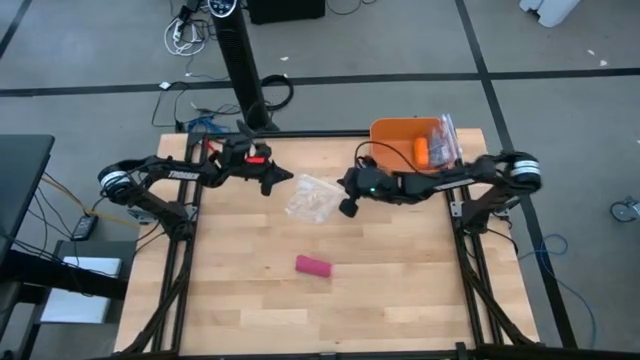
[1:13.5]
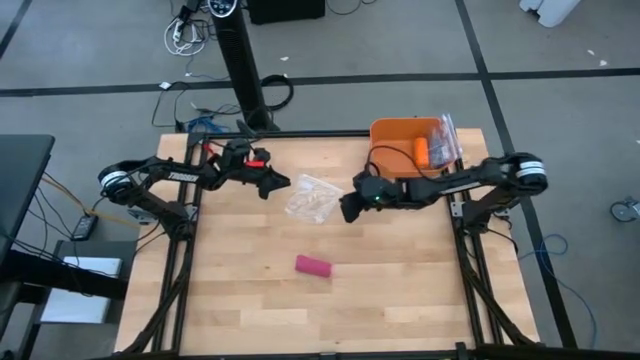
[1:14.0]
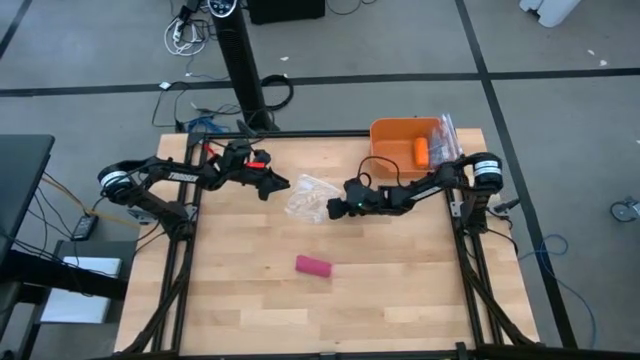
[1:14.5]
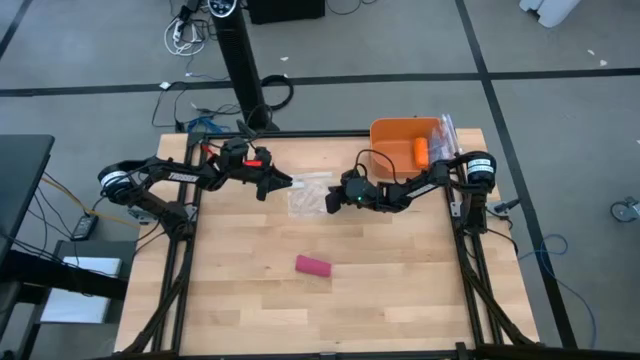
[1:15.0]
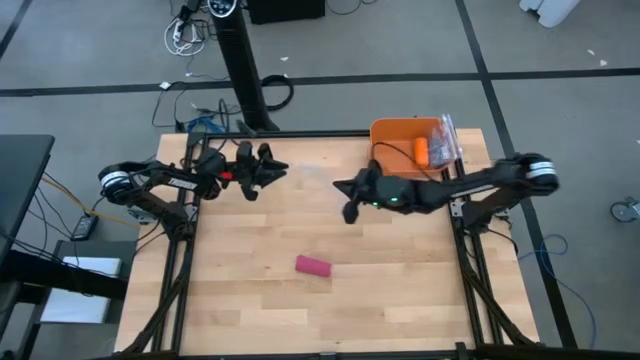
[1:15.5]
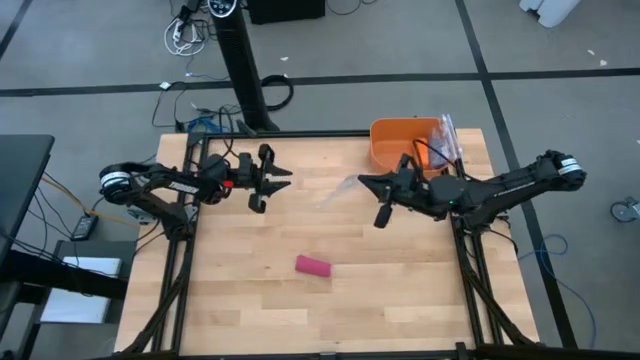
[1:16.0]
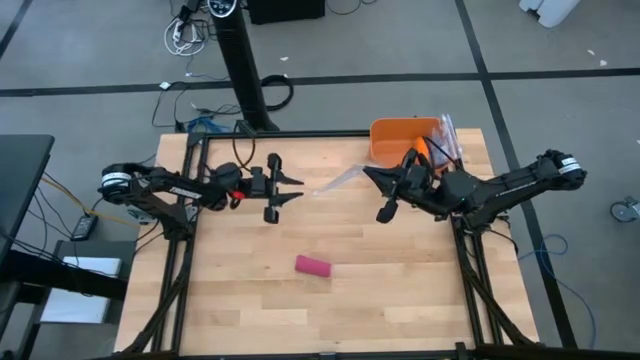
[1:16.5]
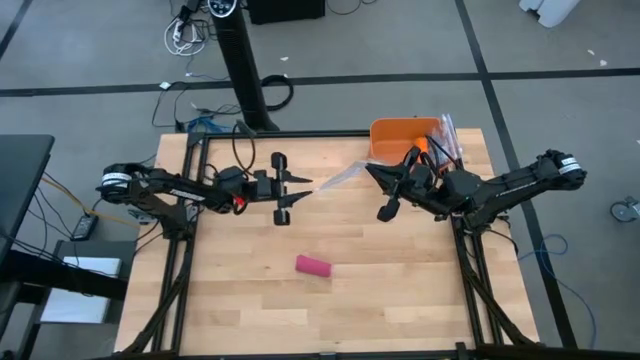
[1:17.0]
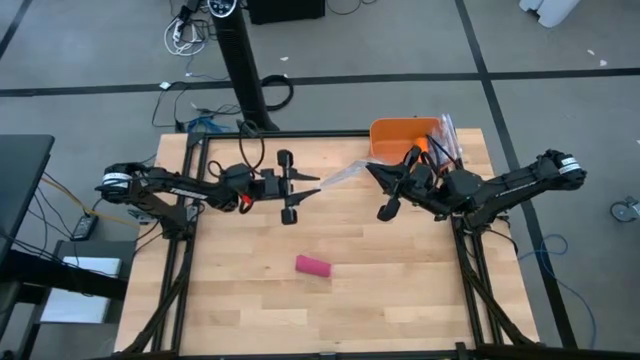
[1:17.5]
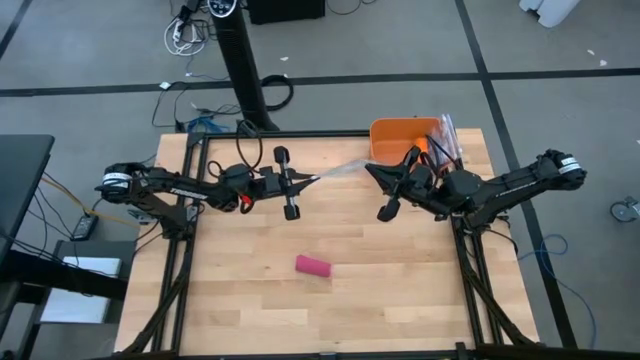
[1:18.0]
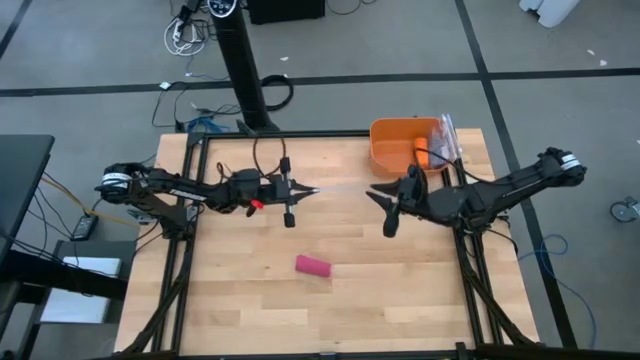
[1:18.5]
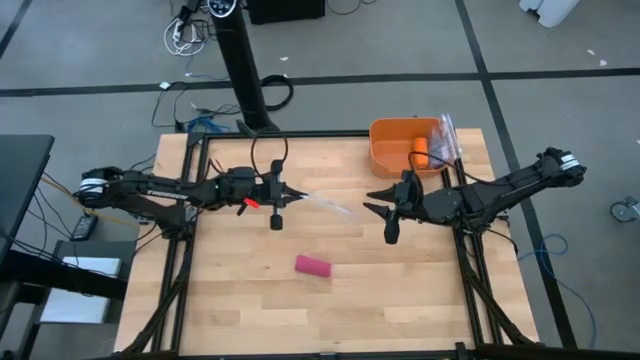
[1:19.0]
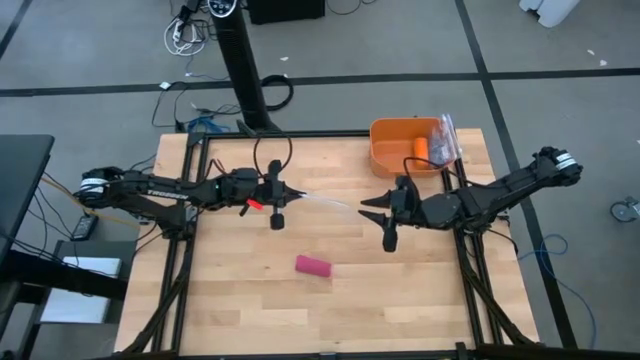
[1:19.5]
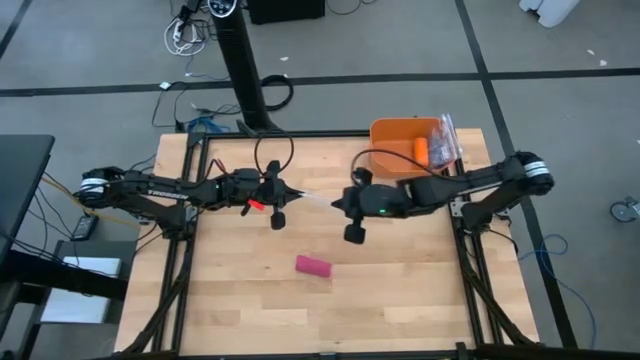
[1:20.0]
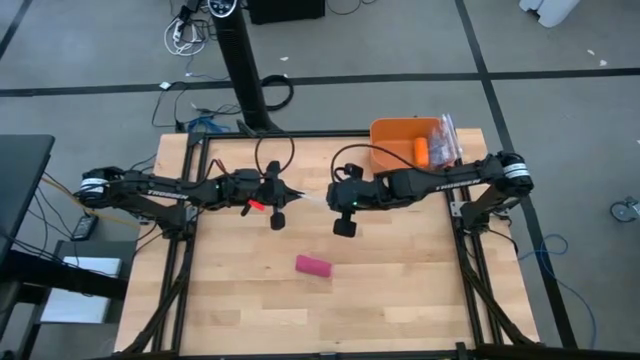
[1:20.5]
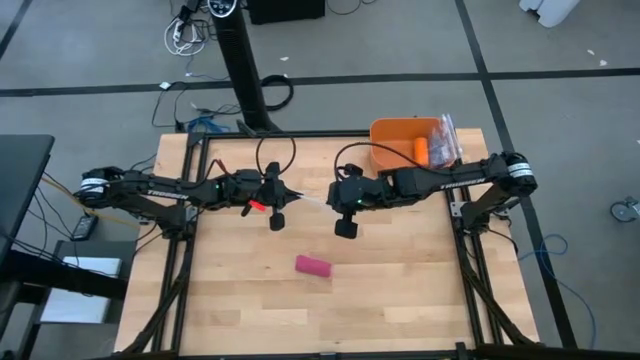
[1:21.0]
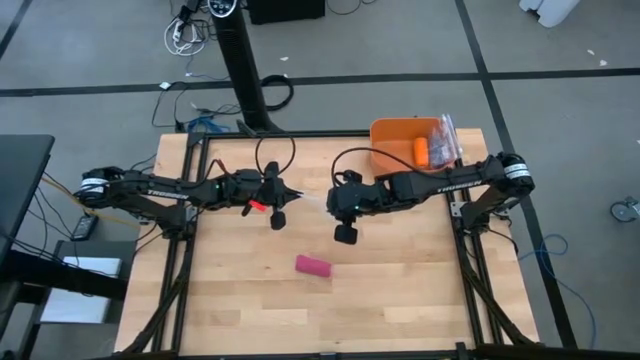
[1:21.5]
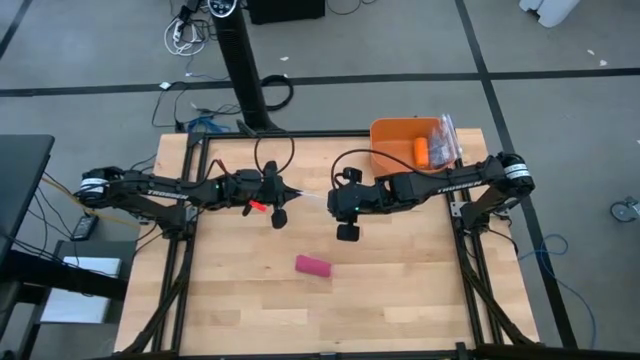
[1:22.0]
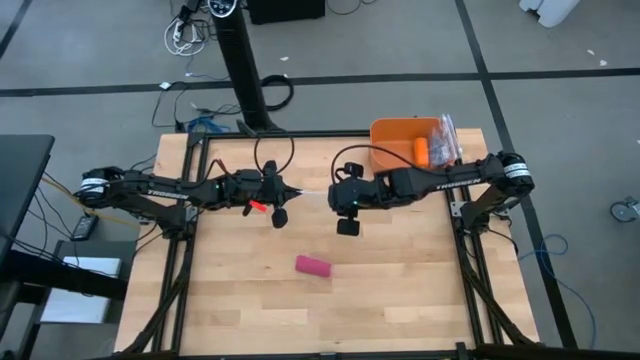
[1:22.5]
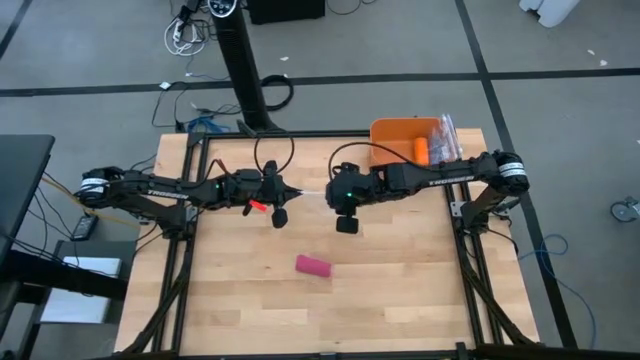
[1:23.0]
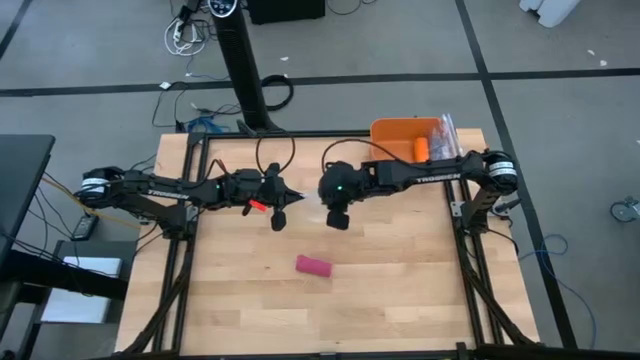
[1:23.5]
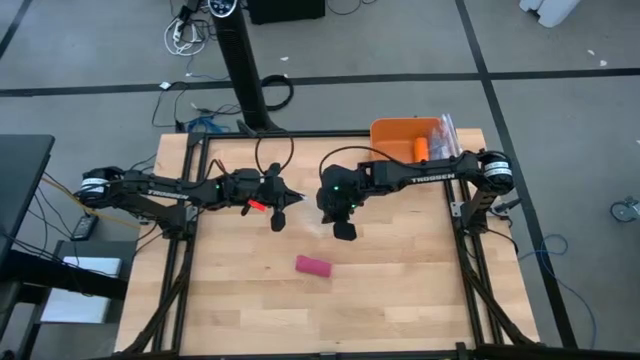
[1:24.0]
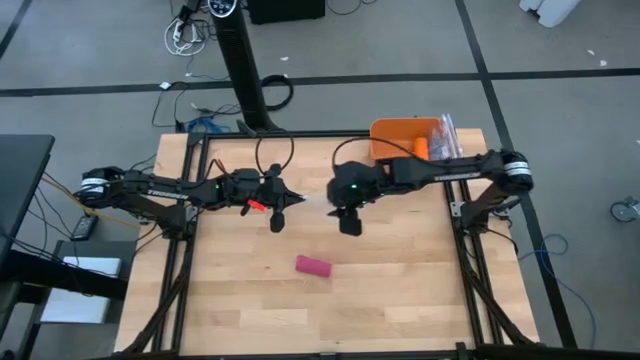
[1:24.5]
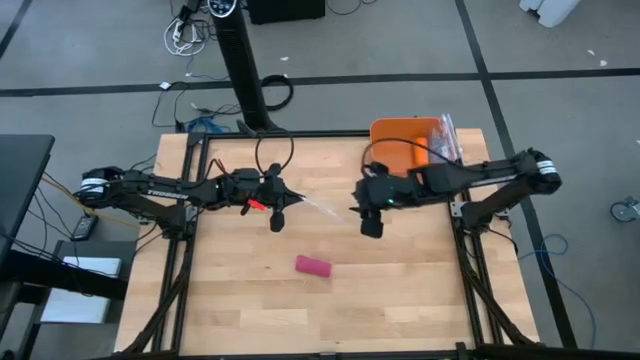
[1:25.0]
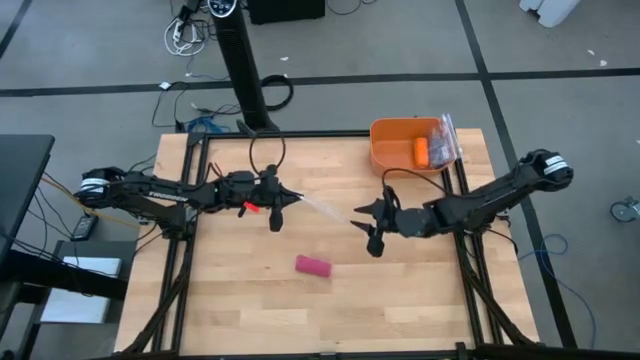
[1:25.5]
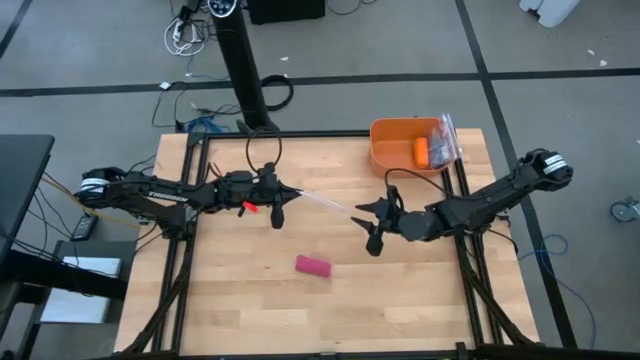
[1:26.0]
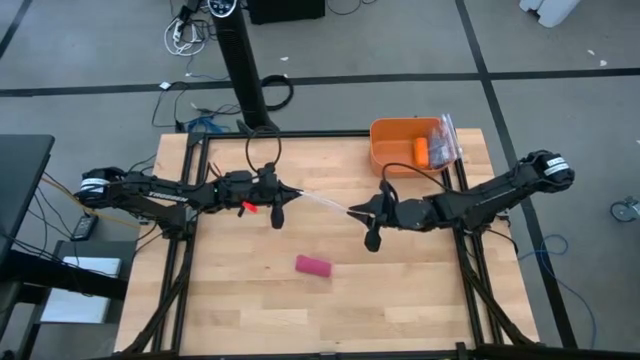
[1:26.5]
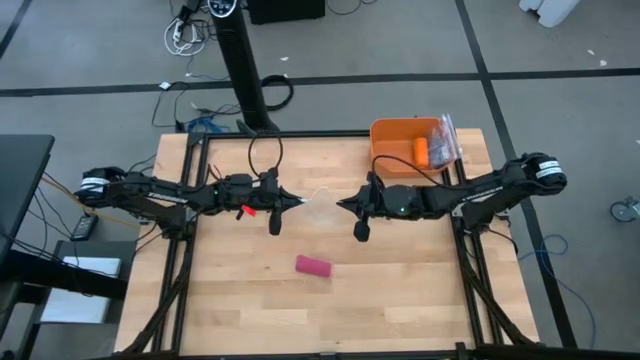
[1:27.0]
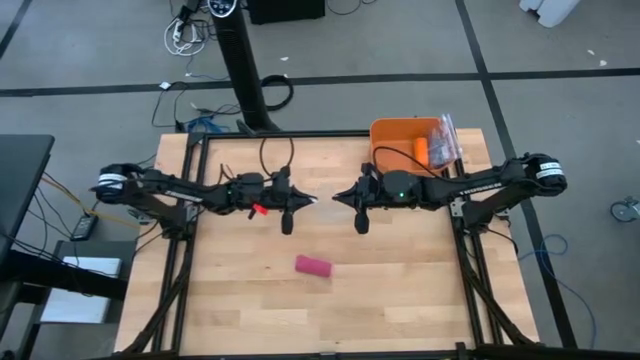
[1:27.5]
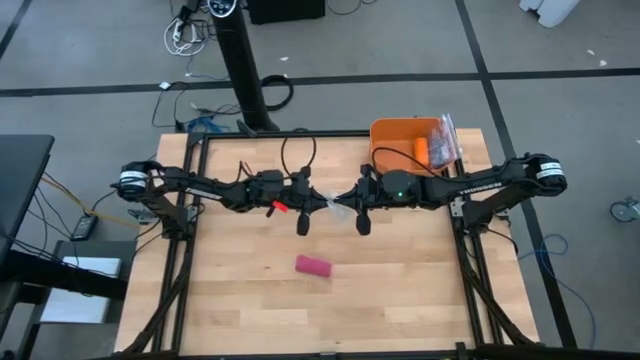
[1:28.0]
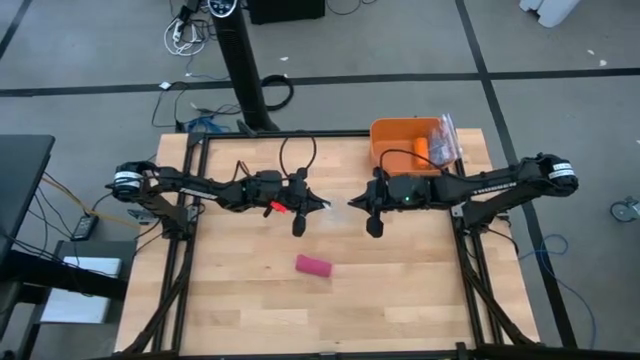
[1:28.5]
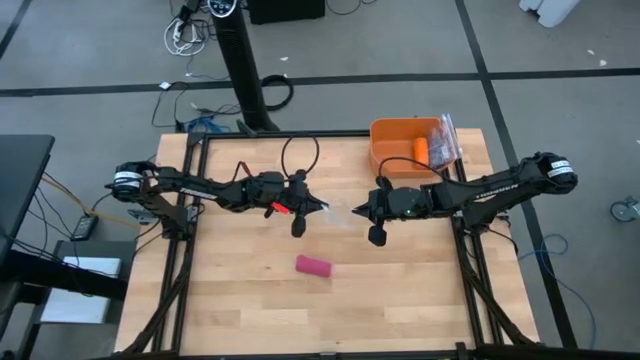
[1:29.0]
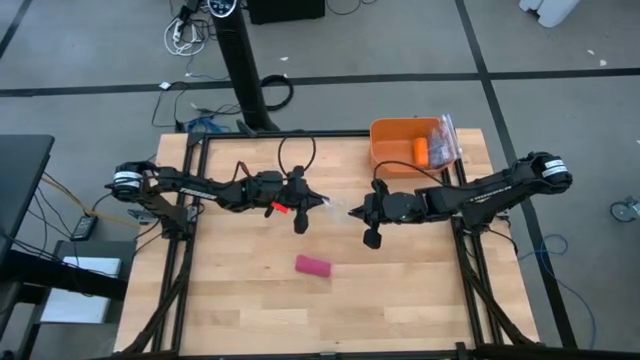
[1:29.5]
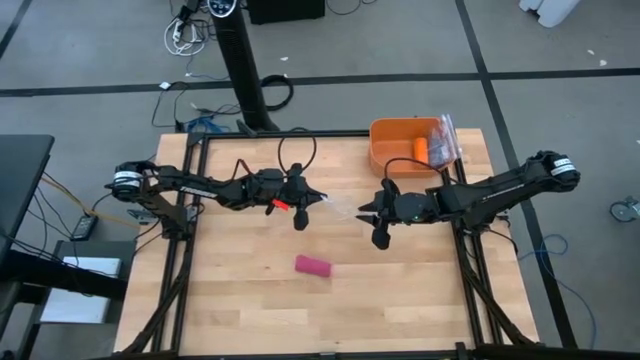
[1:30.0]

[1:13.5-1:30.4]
Task: Roll bandage
Open the transparent zip bag

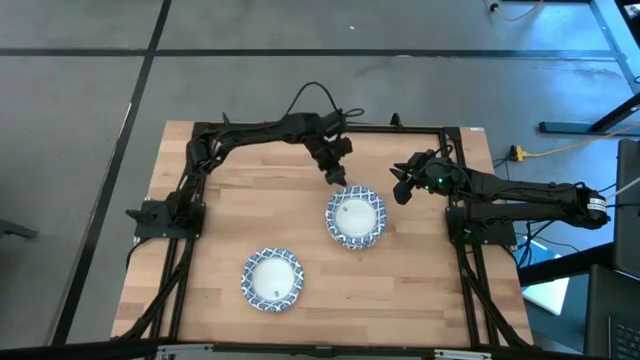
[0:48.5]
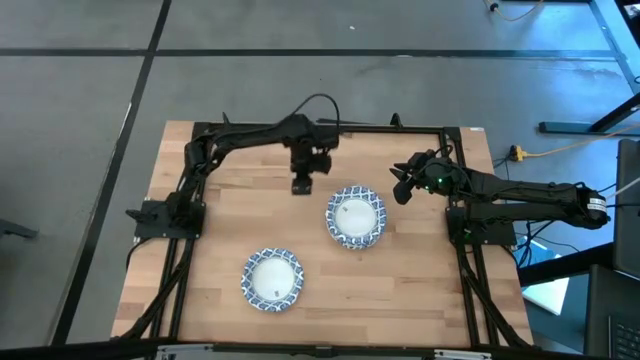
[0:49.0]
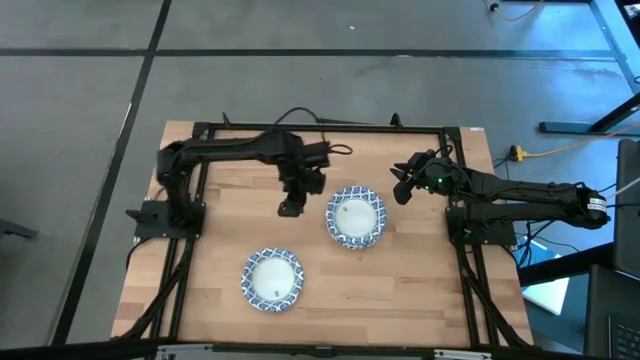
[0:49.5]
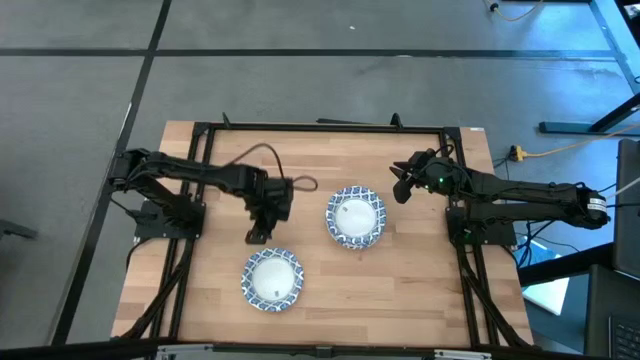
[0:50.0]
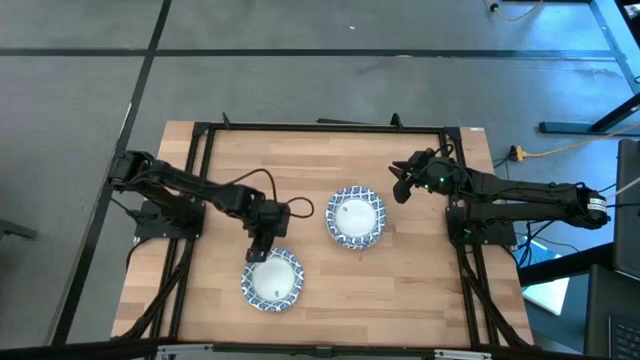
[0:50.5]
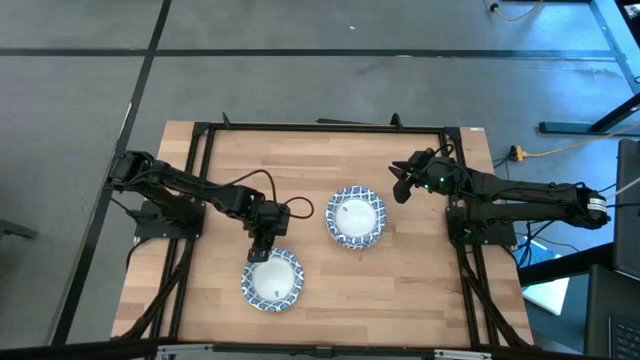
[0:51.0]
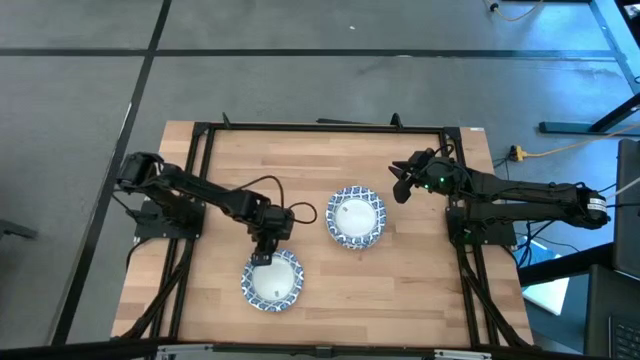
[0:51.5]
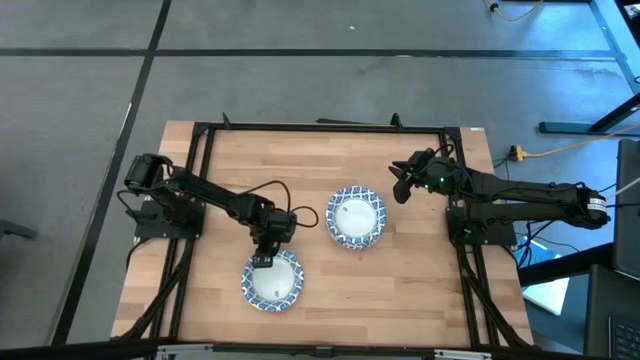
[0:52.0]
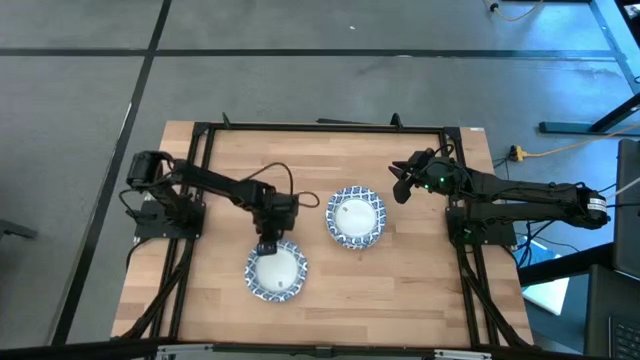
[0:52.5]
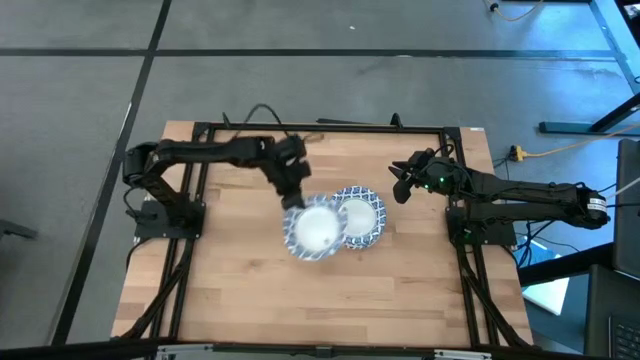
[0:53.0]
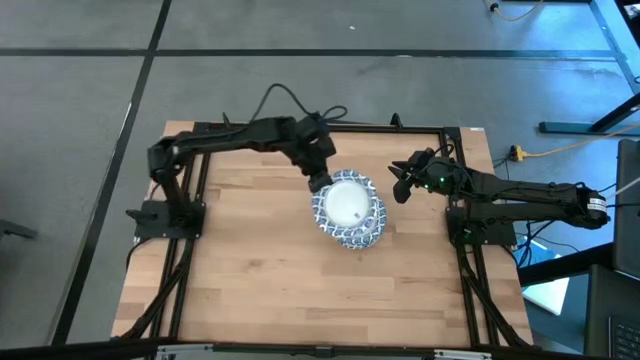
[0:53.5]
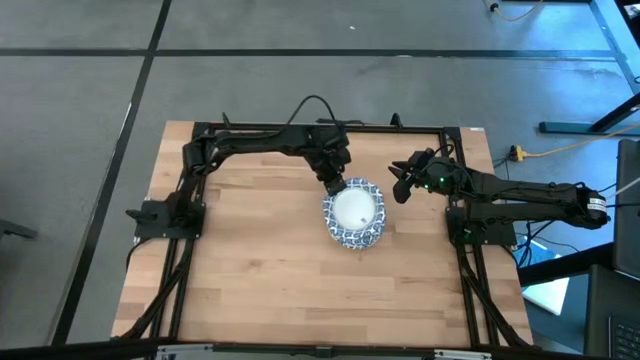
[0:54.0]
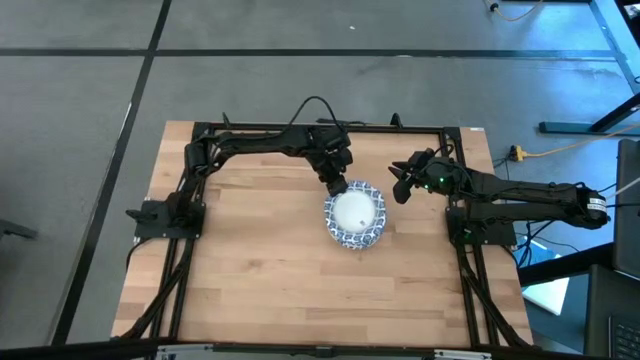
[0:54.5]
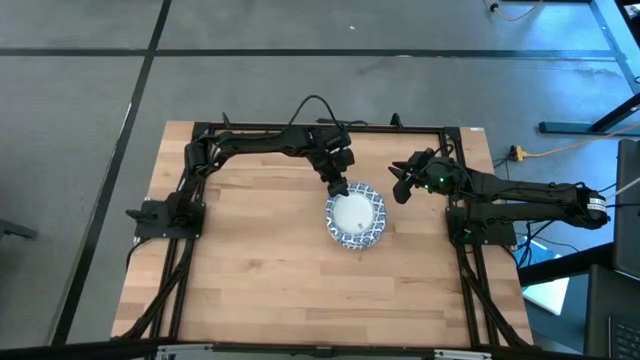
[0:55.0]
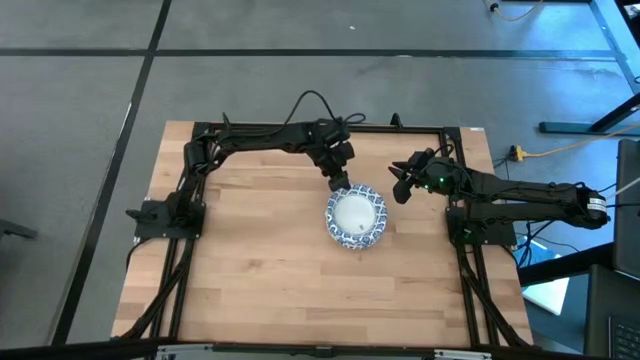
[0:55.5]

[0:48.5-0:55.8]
Task: Nest bowls inside each other
Stack the white patterned bowls on top of the other white patterned bowls
